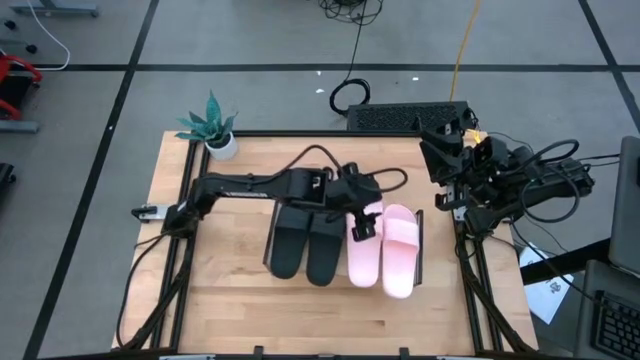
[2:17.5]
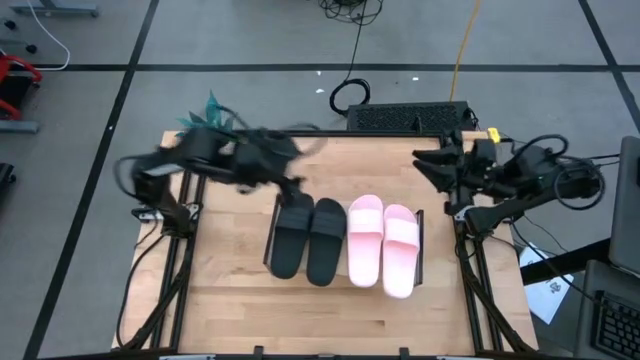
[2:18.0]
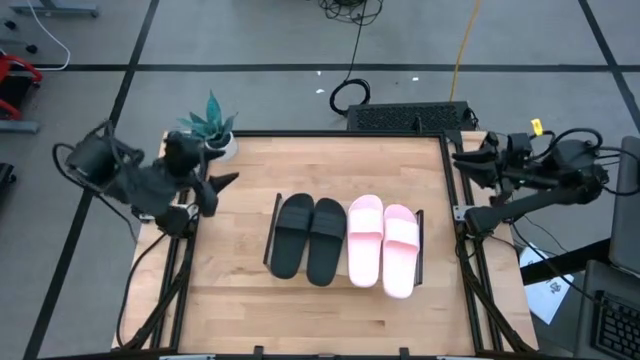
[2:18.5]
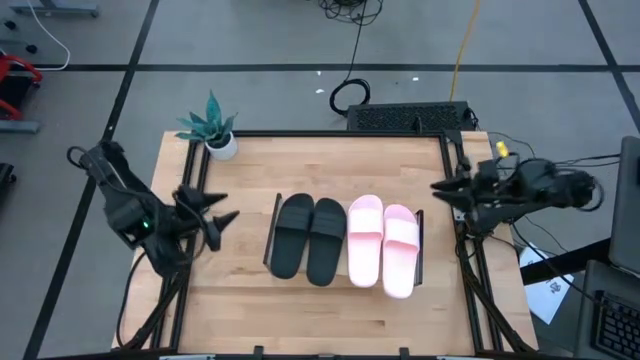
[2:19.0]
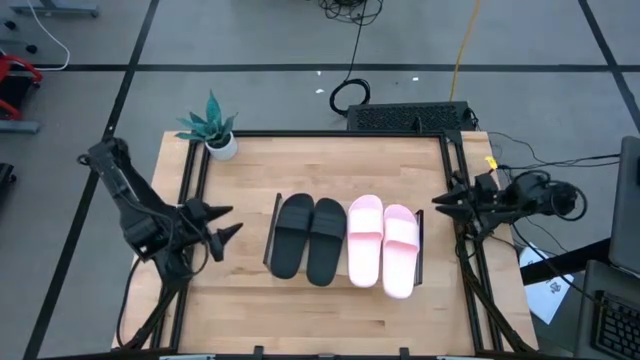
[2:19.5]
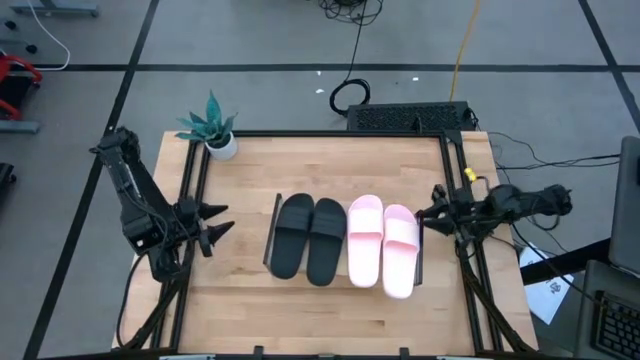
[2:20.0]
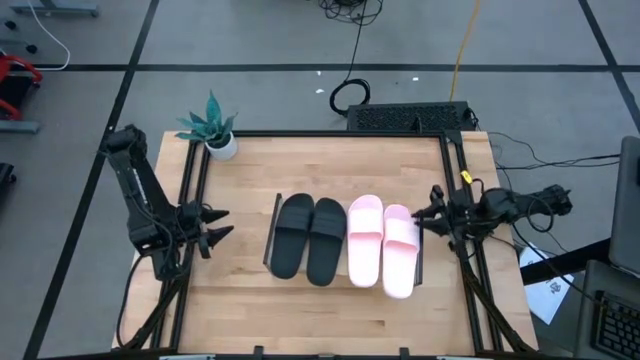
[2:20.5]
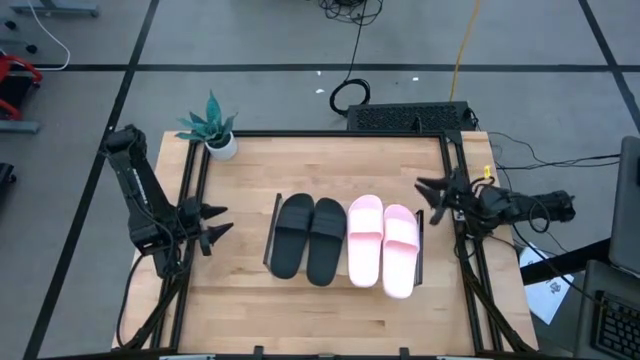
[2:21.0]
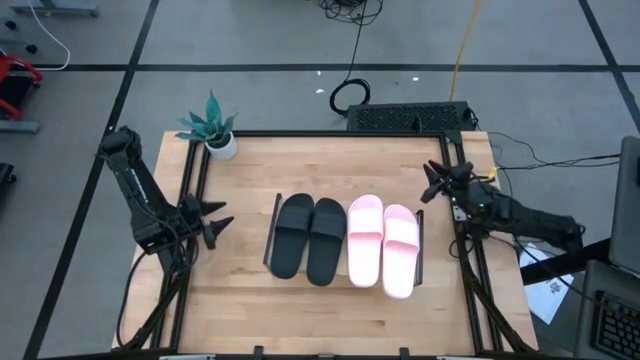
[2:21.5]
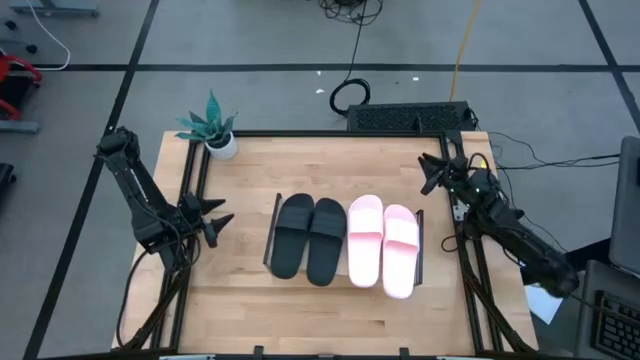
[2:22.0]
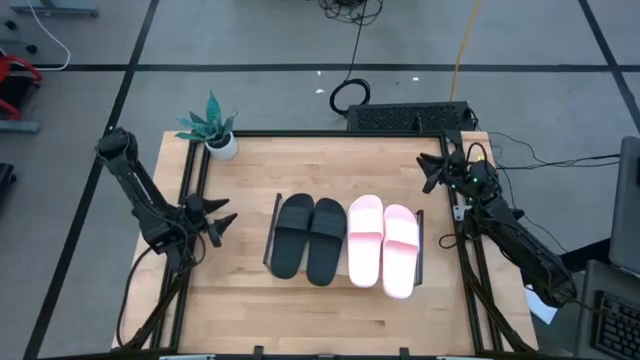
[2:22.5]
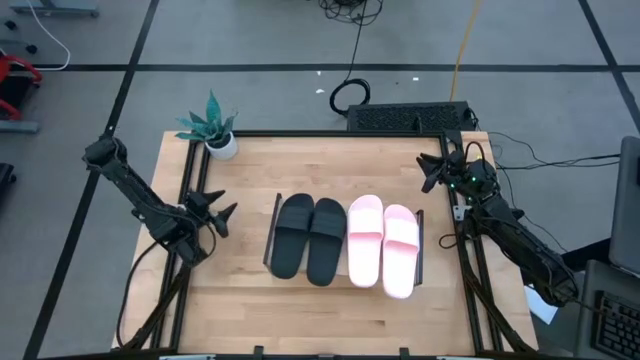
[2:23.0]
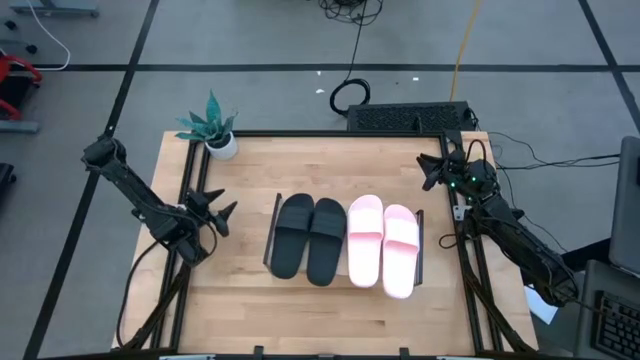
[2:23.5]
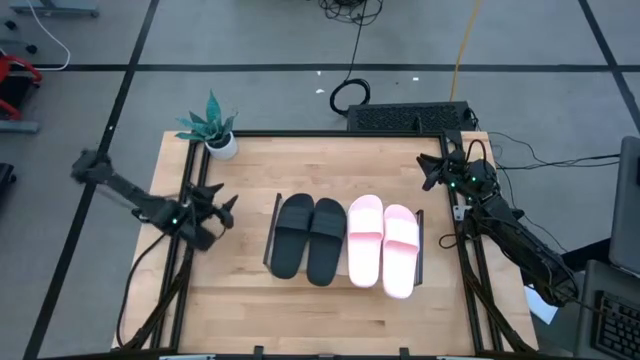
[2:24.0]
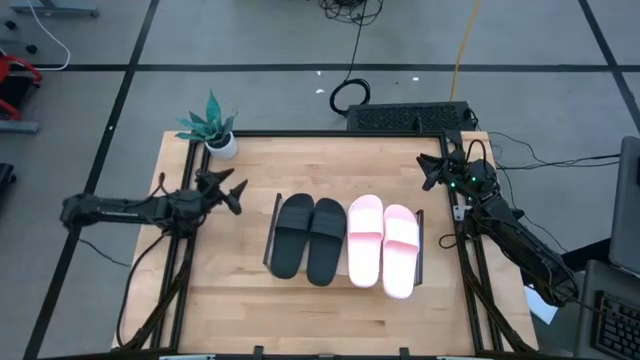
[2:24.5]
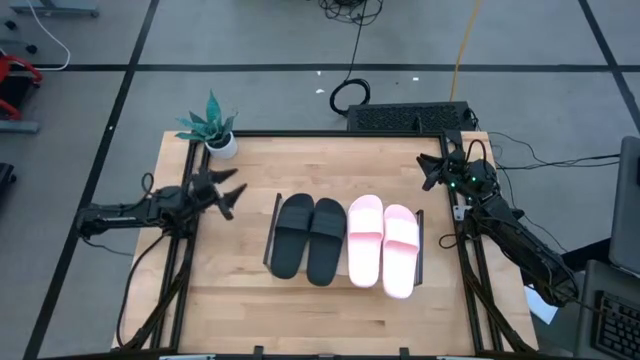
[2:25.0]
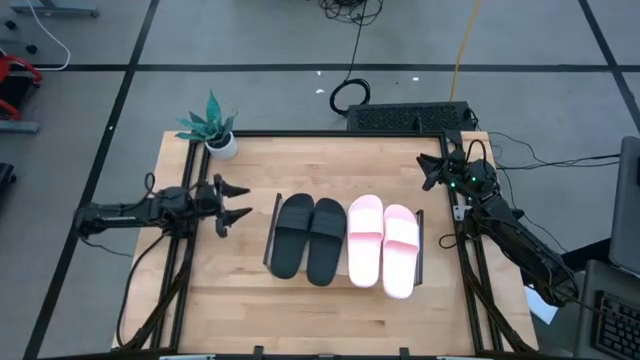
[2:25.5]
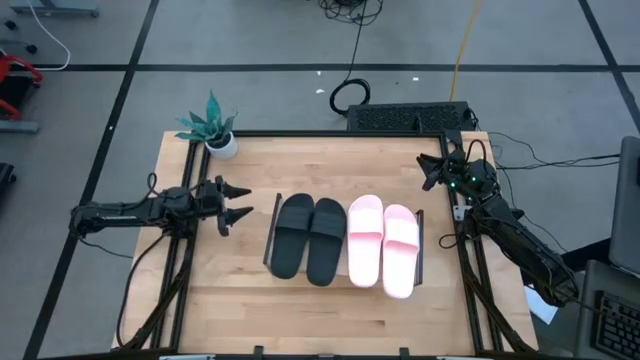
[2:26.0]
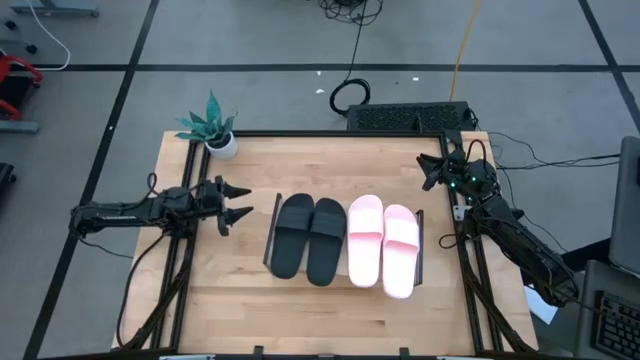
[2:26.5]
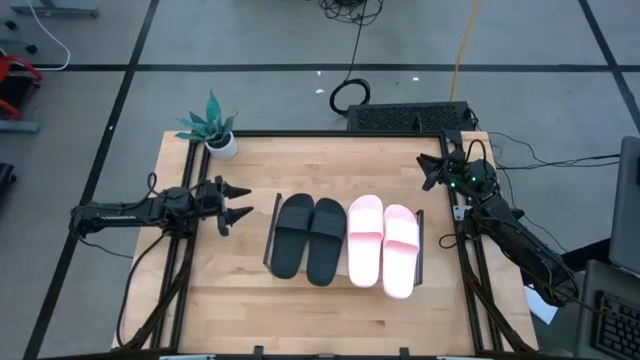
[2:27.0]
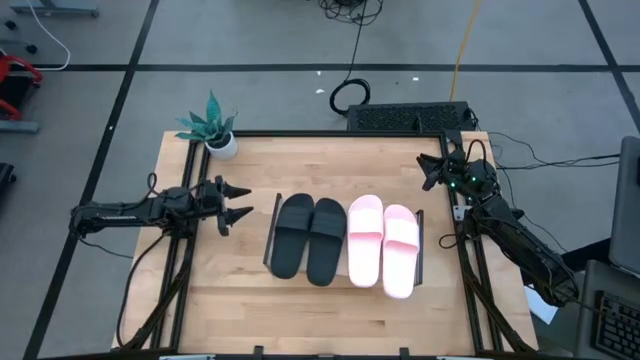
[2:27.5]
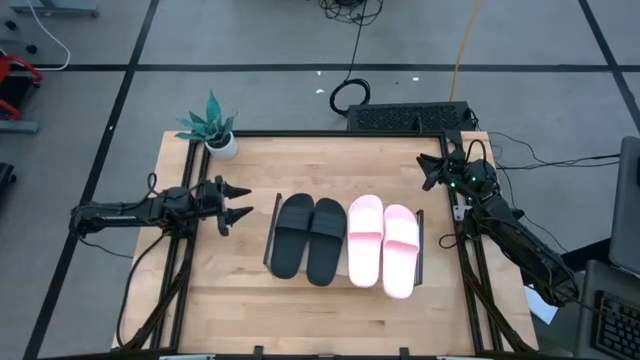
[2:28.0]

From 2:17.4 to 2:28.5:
Task: Pick and place slides into the shelf
Return To Home Position

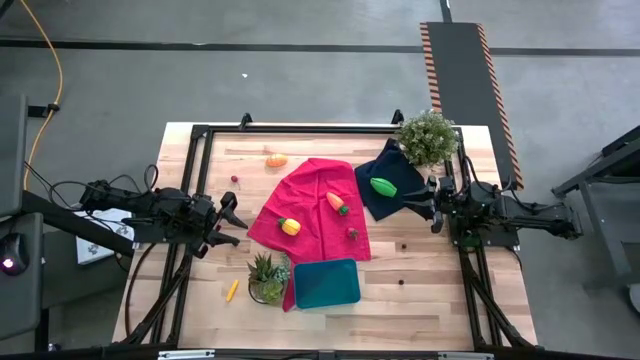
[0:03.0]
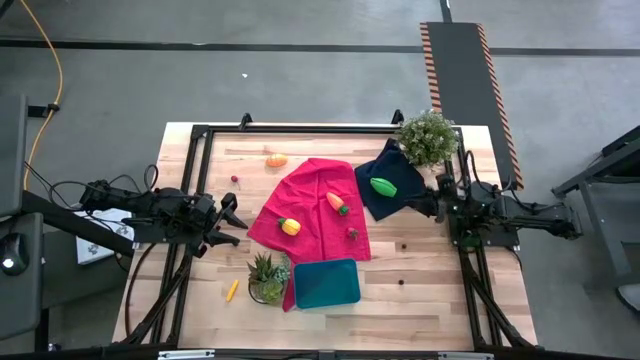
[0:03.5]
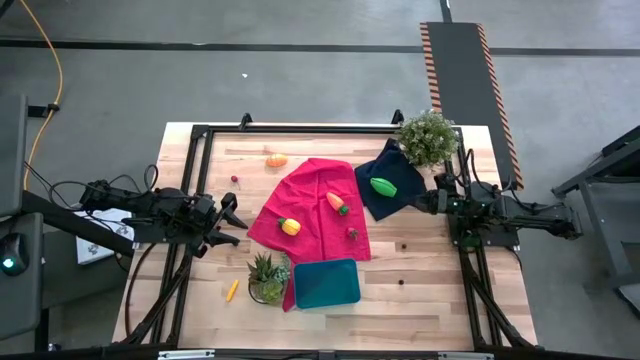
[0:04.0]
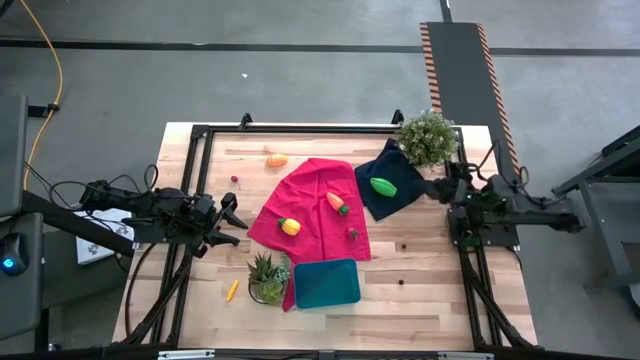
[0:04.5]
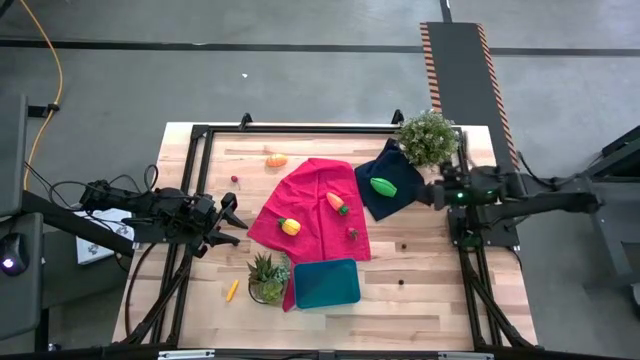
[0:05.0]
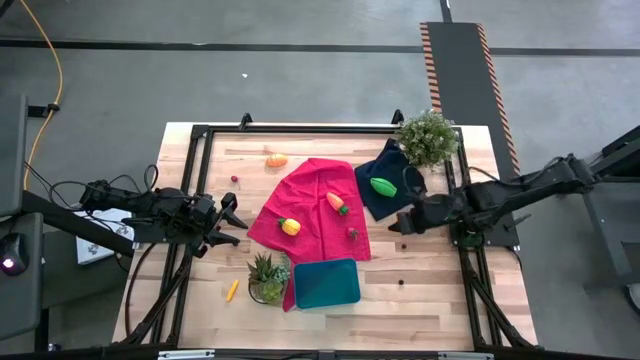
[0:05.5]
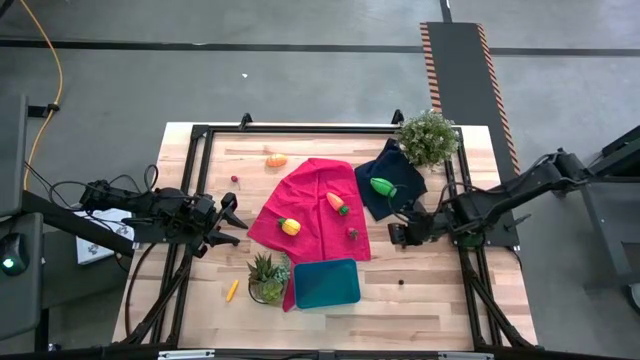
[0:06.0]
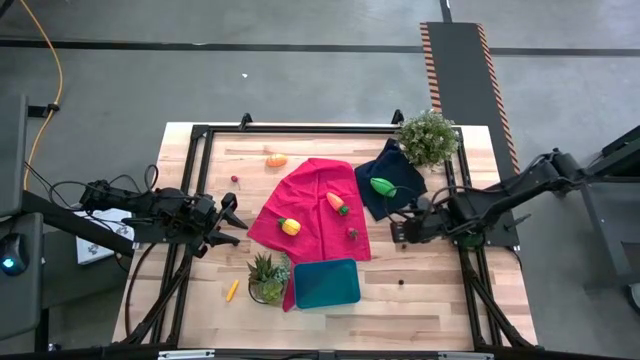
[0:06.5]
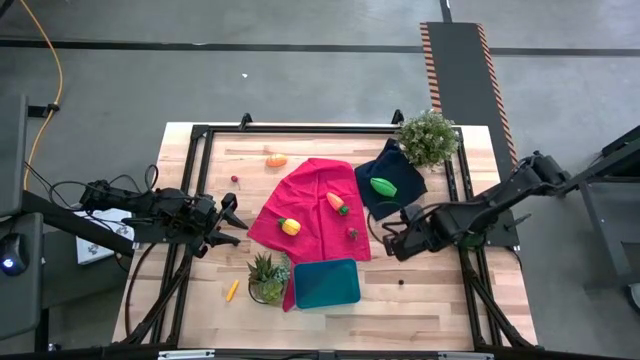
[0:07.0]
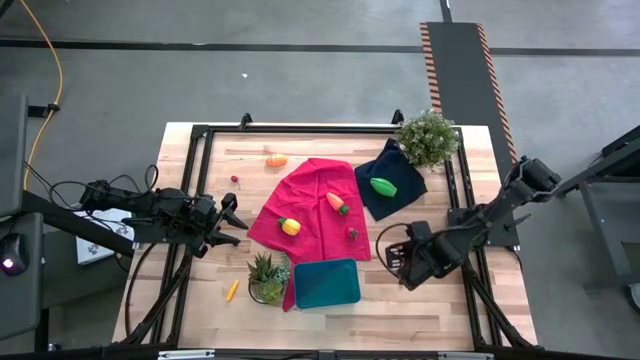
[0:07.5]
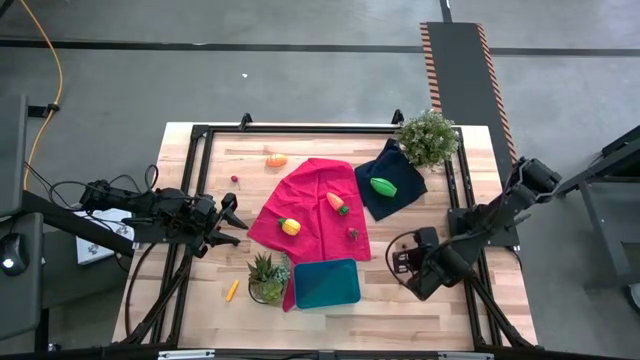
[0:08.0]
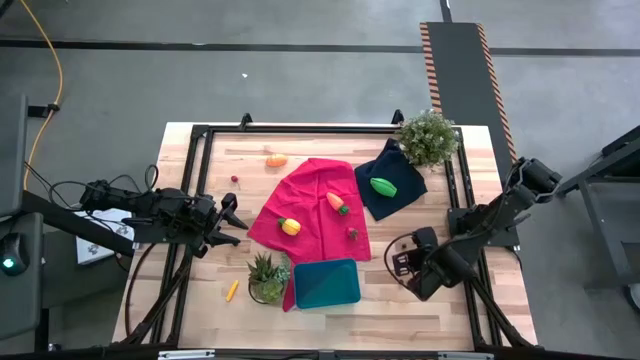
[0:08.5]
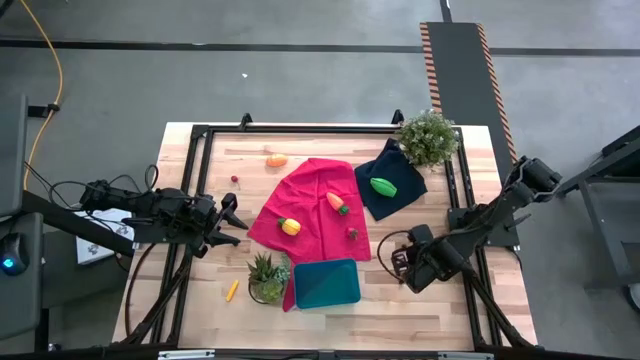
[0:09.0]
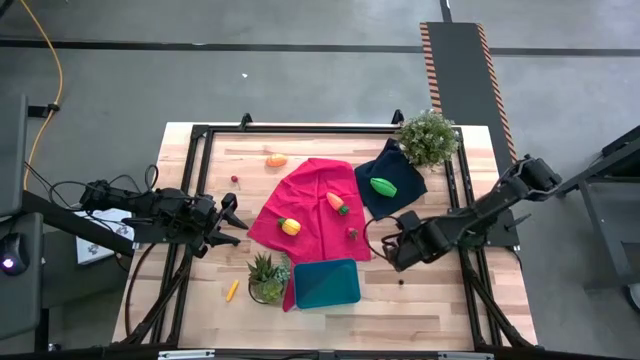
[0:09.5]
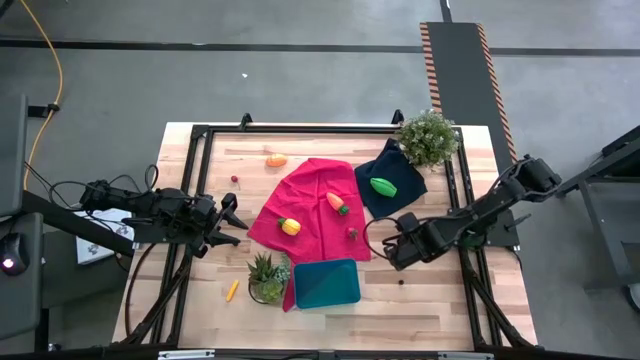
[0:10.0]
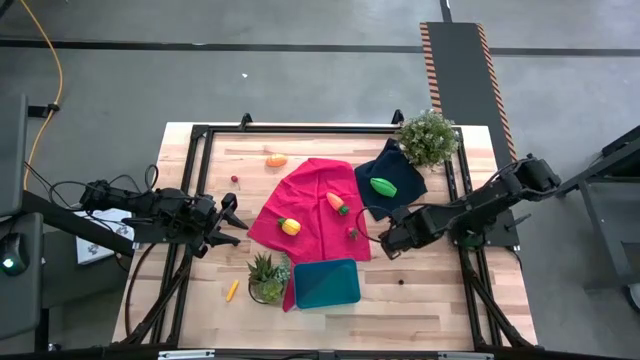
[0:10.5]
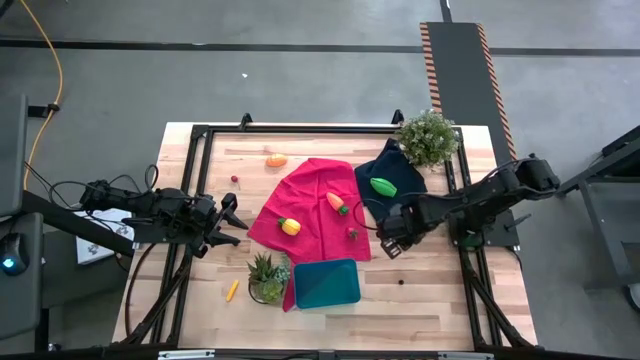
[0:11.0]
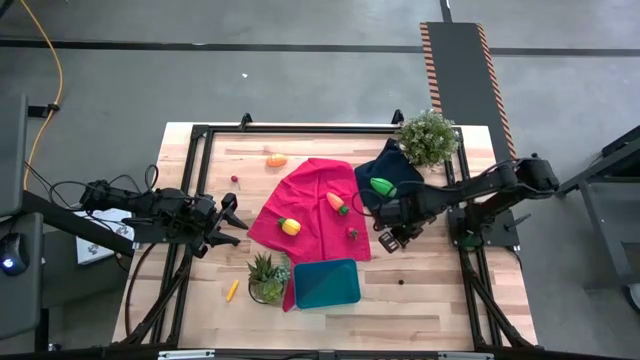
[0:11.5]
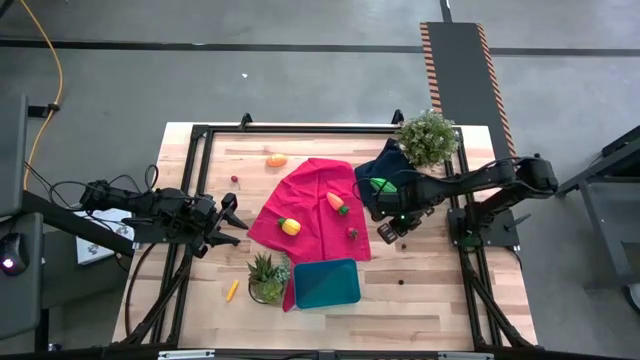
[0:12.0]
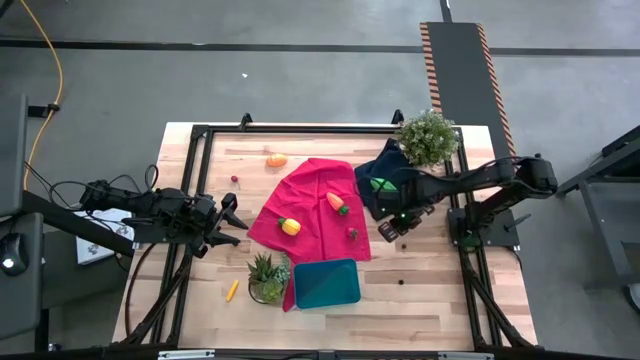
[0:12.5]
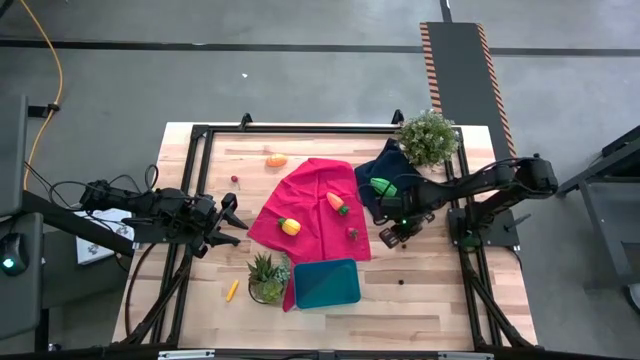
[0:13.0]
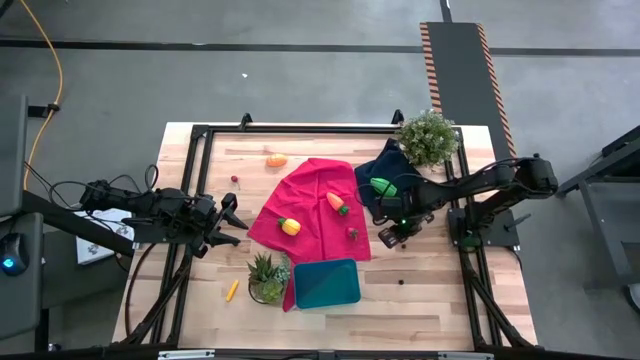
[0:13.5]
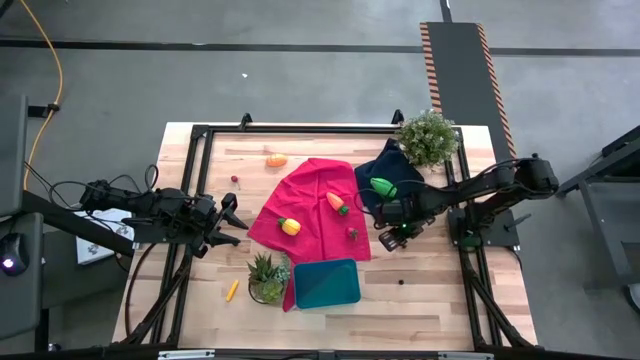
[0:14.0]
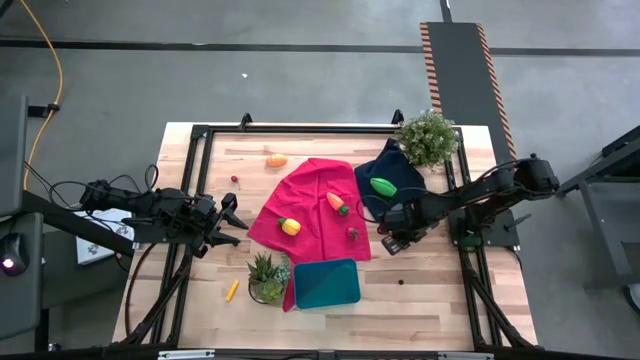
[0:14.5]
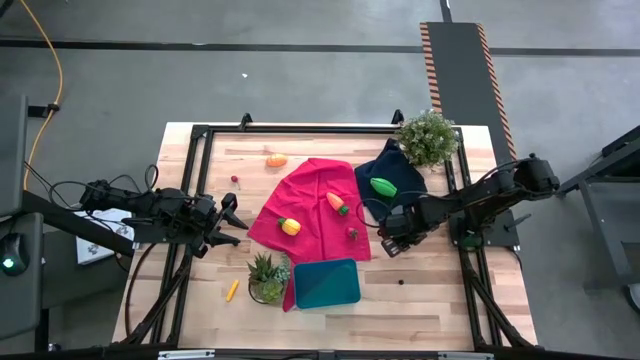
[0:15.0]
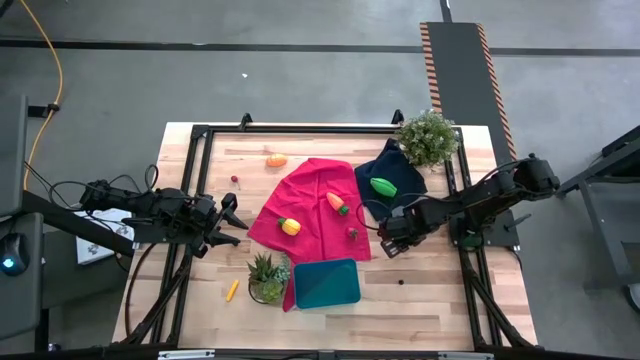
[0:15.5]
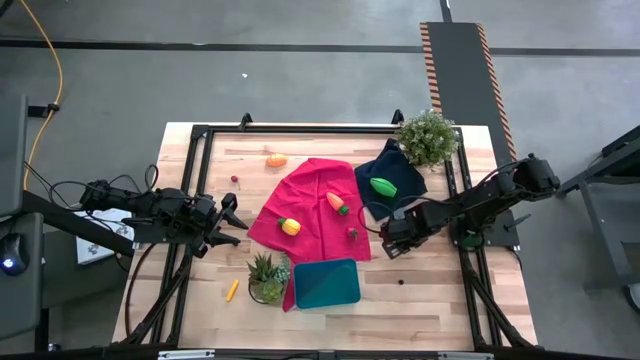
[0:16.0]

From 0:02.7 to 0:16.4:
Task: Pick and placing Produce into tupperware
Put the top blue berry into the blue bin
